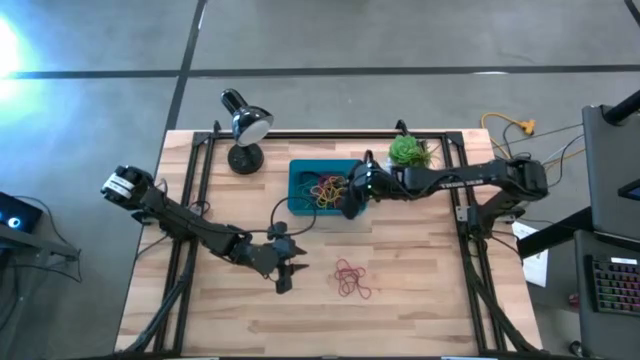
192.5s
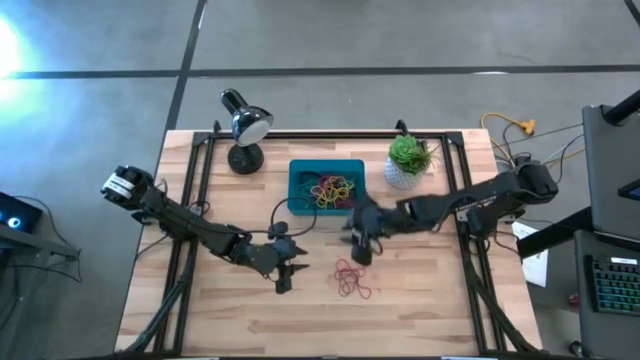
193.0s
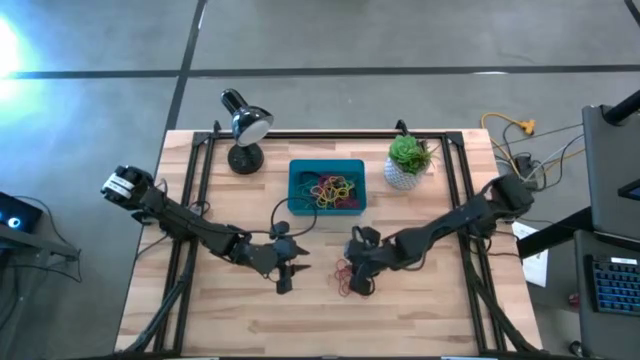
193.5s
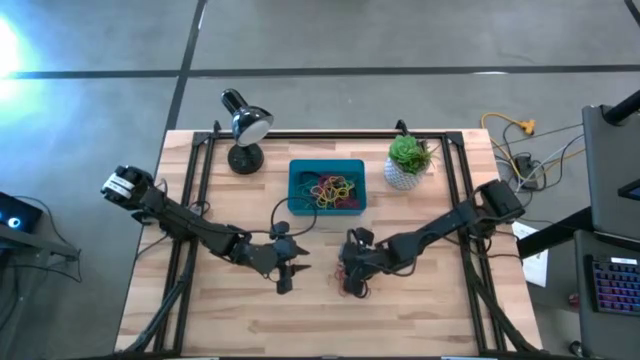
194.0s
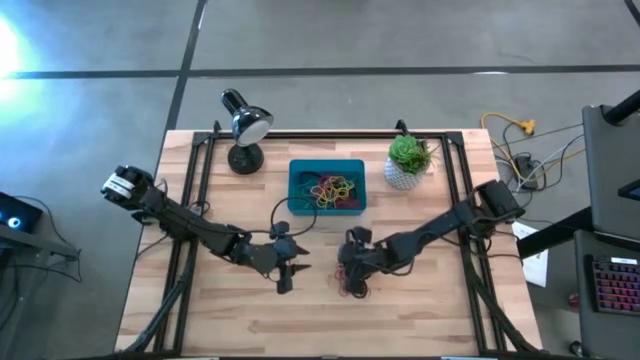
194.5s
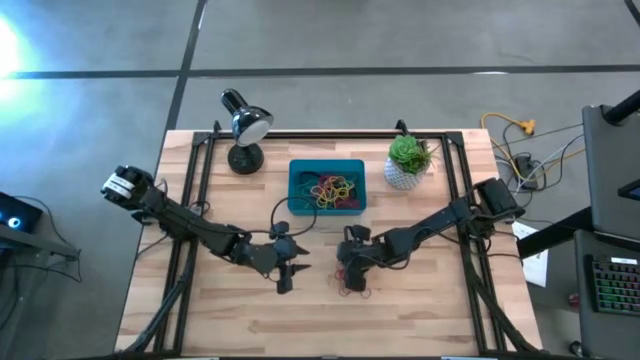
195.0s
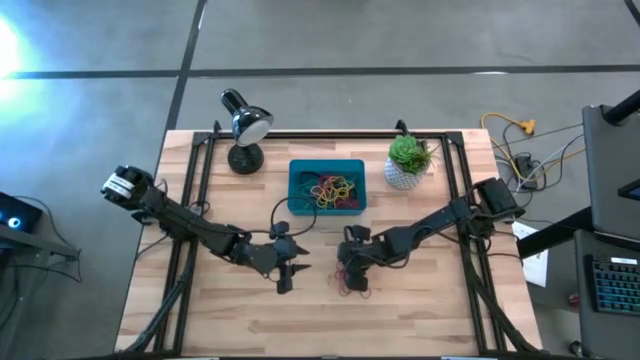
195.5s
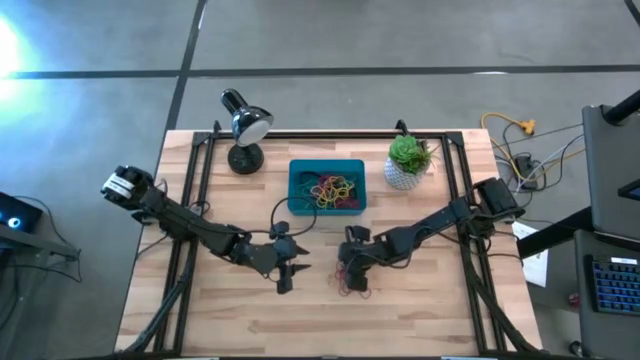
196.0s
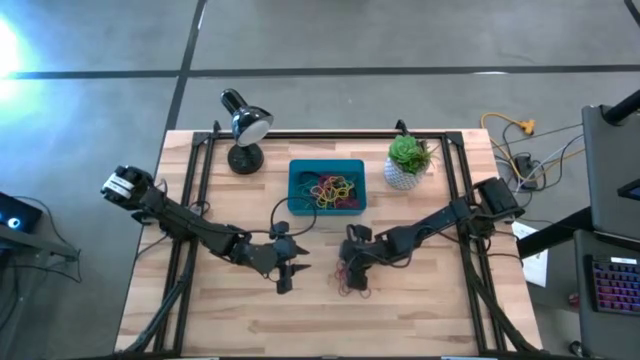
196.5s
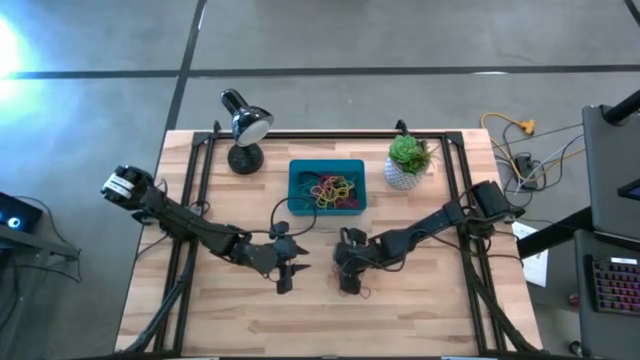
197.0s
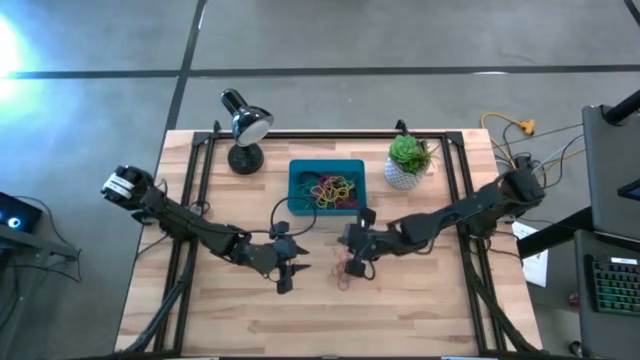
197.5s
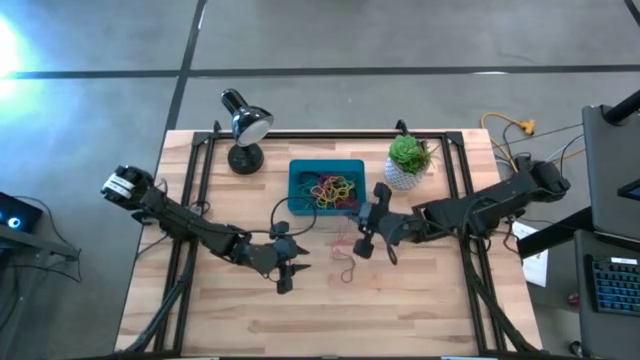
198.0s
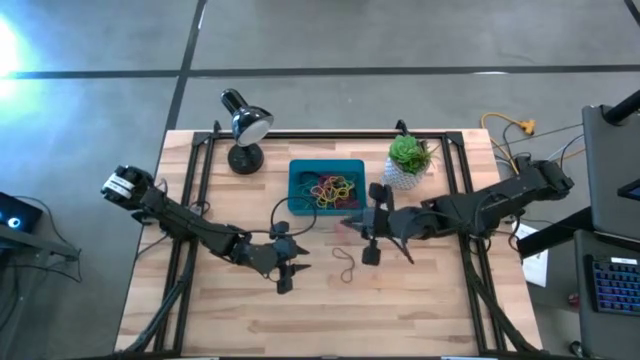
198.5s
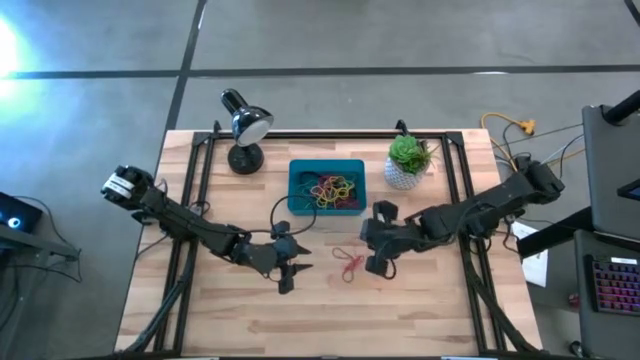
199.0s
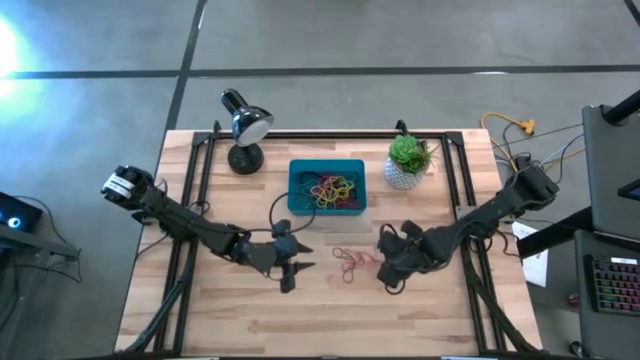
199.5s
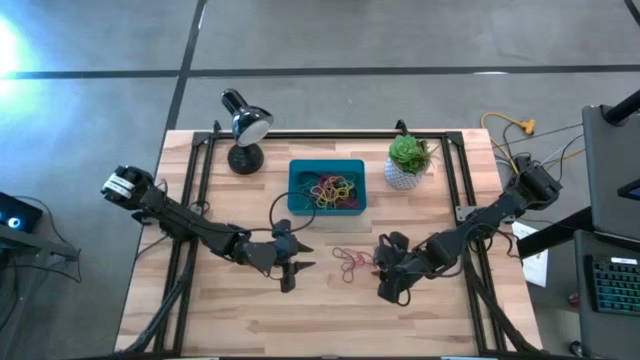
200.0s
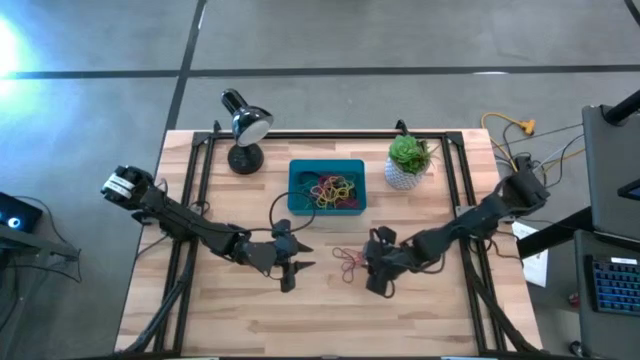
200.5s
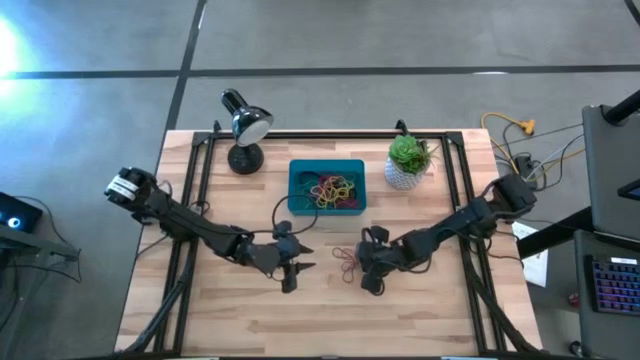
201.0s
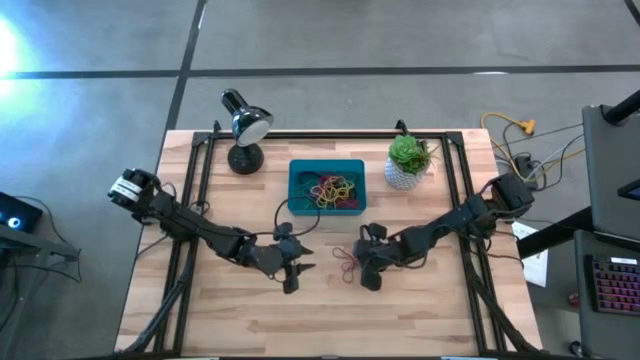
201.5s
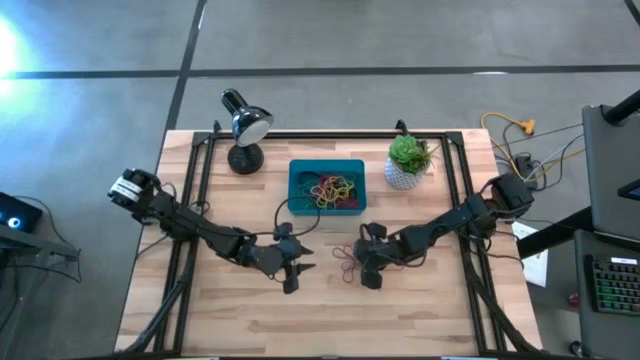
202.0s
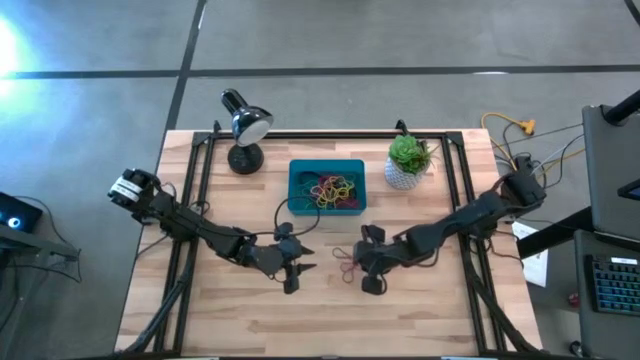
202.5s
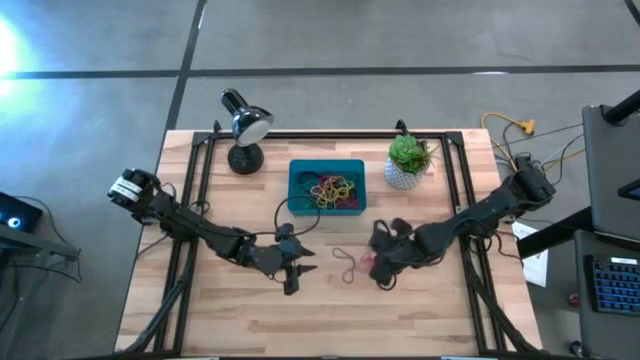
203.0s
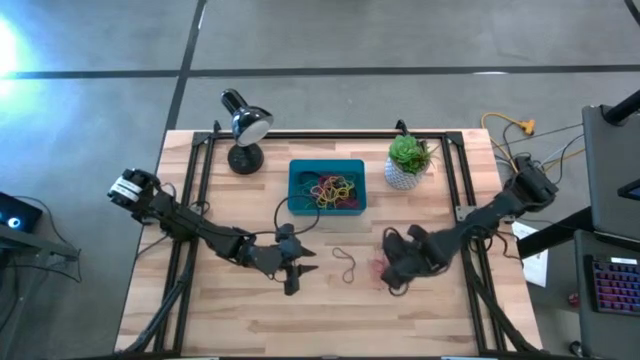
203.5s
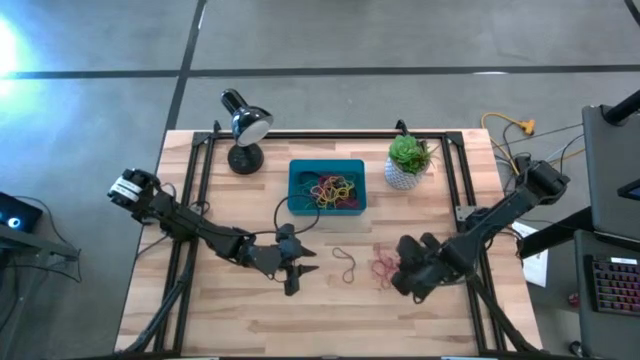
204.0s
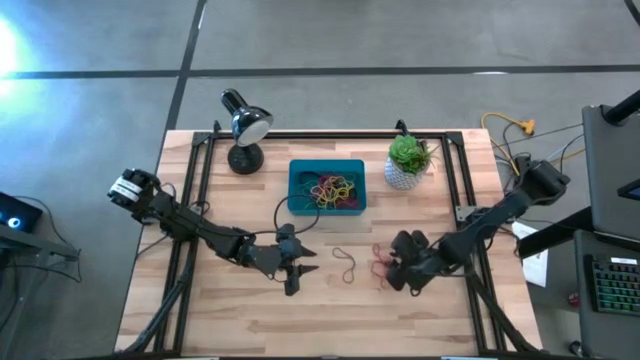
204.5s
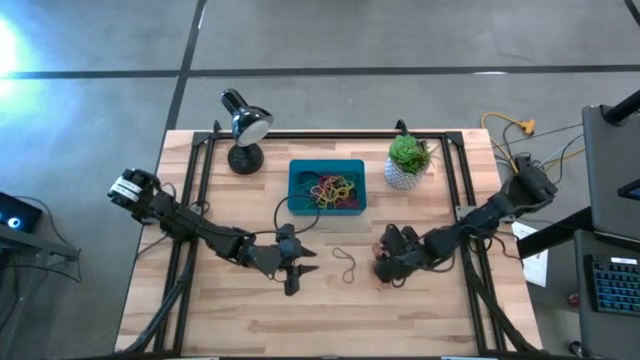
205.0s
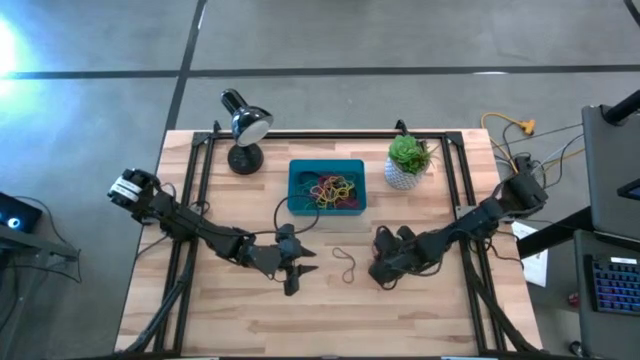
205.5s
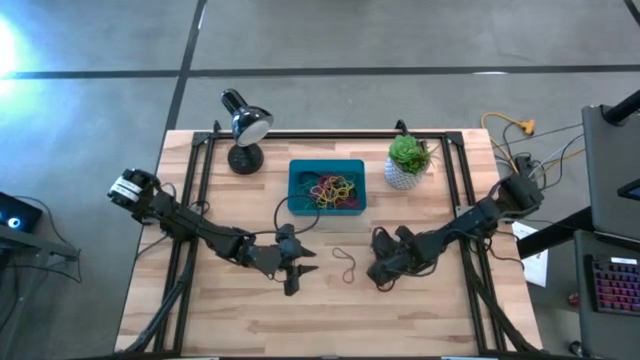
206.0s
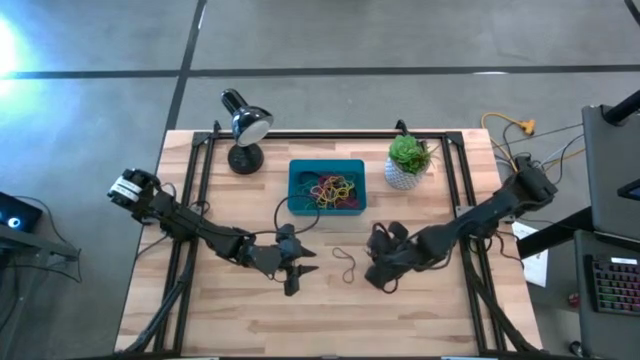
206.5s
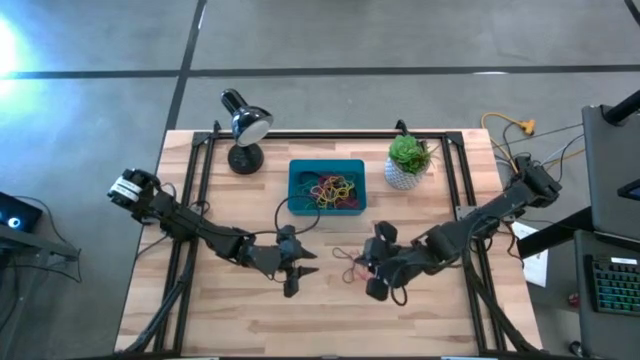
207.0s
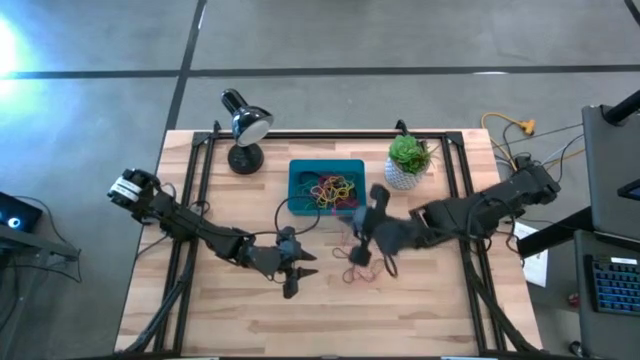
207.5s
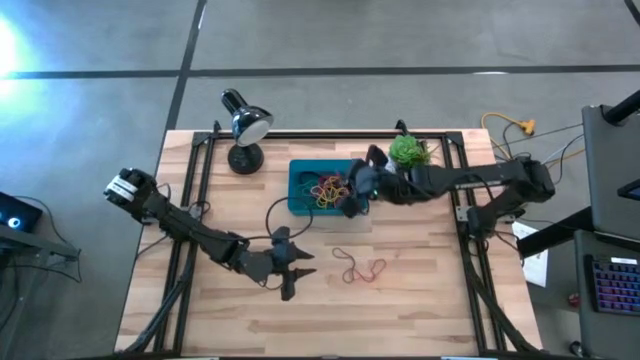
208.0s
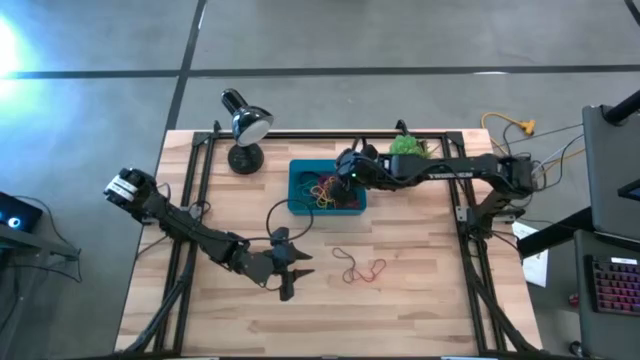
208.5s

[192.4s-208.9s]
Task: Pick and place rubber bands into bin
Put the red rubber band into the dark blue bin

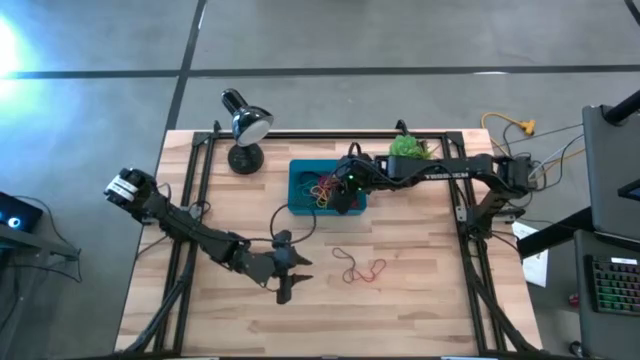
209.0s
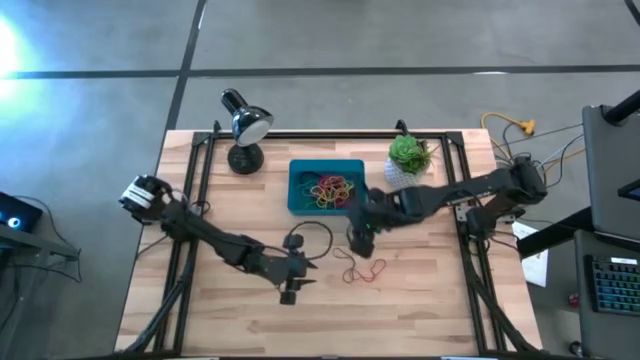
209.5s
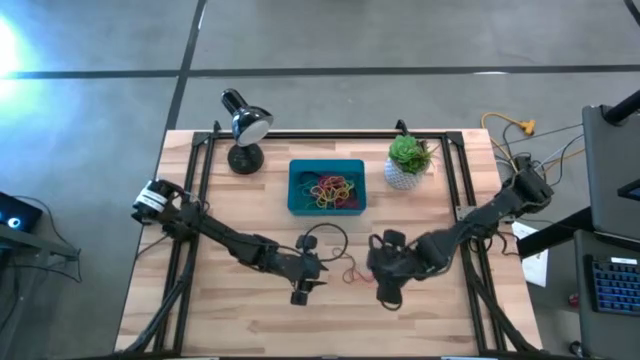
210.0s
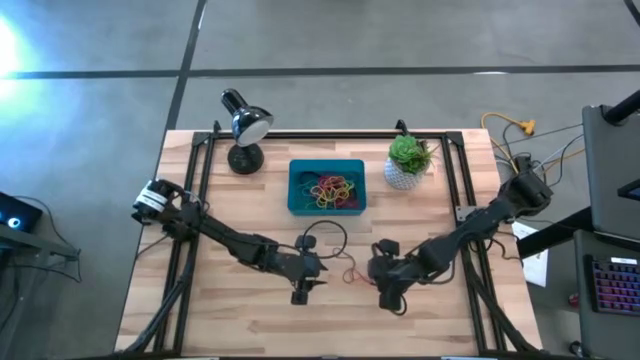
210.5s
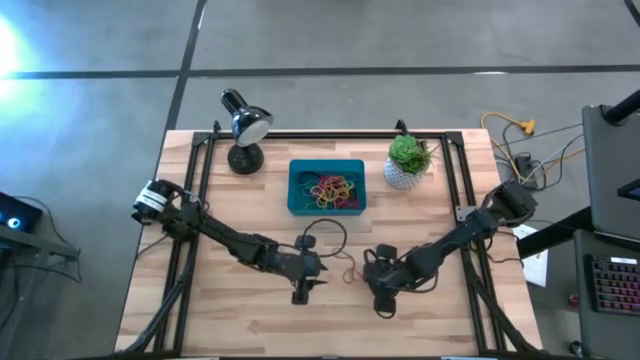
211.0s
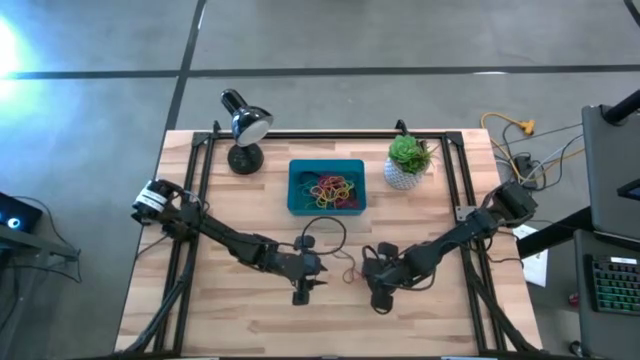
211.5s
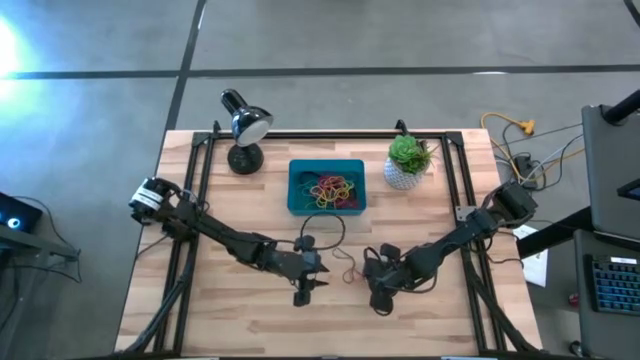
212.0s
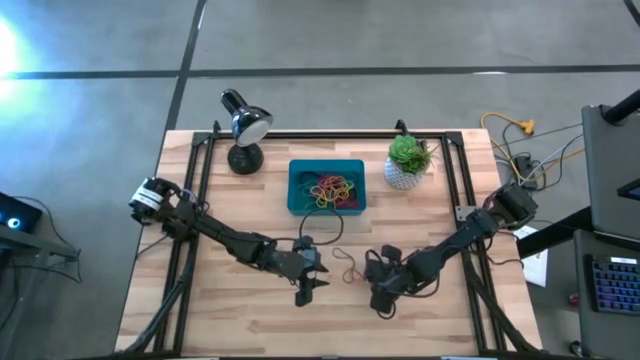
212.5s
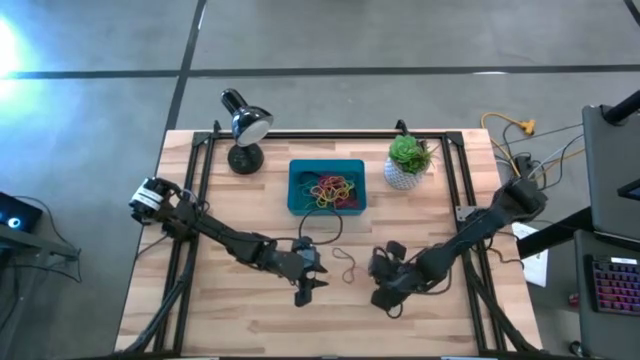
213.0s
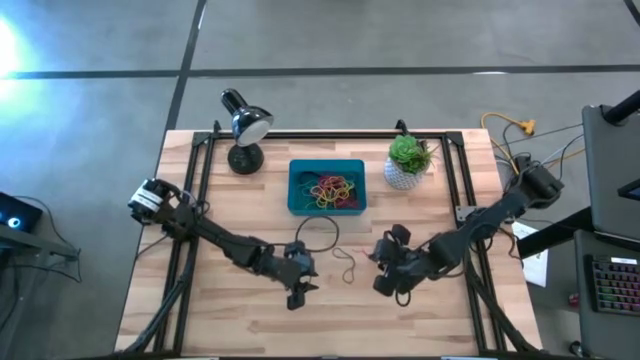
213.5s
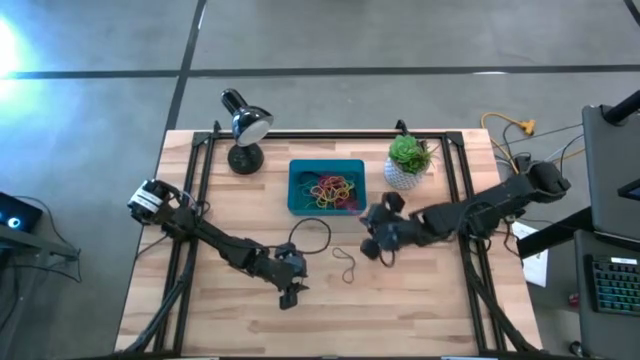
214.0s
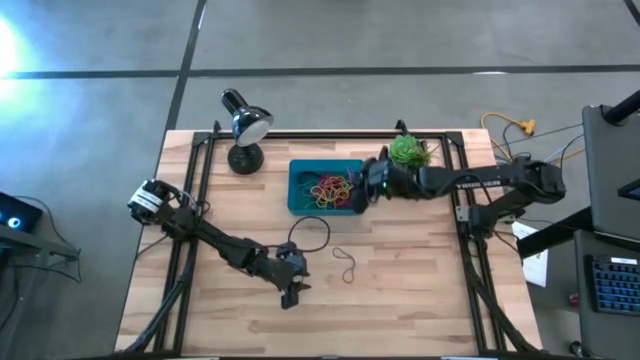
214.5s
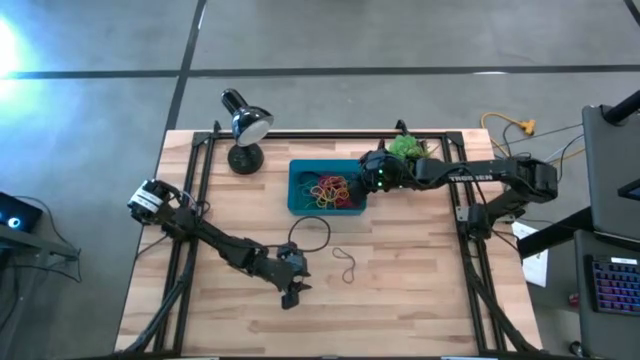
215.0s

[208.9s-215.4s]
Put the red rubber band into the dark blue bin
